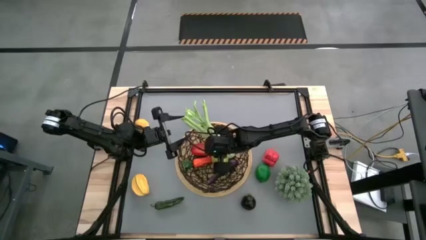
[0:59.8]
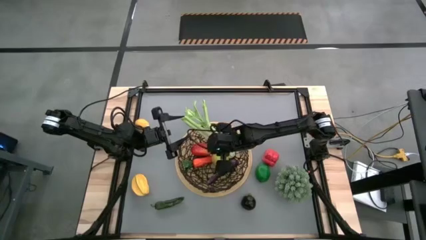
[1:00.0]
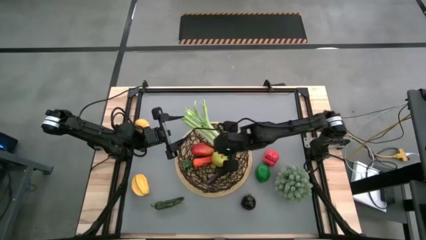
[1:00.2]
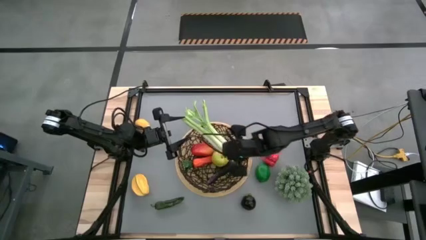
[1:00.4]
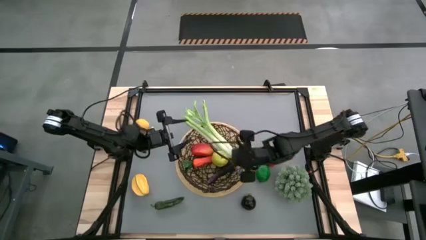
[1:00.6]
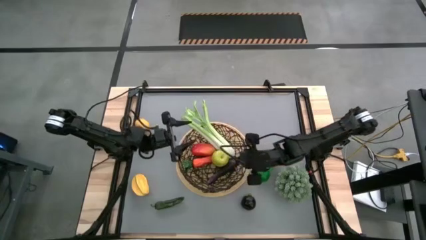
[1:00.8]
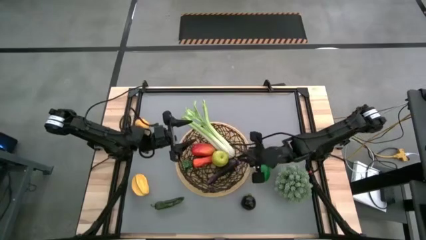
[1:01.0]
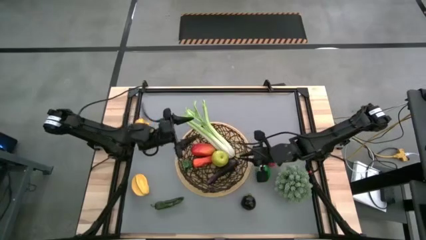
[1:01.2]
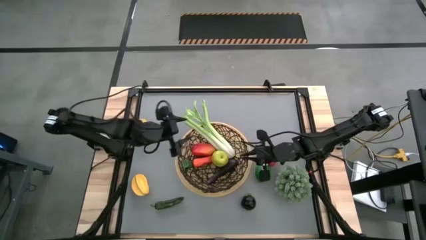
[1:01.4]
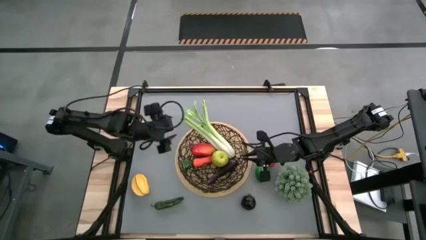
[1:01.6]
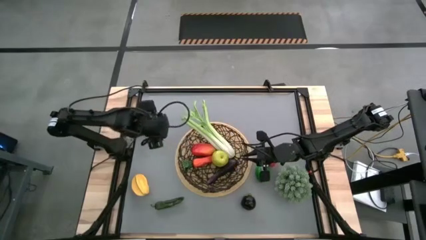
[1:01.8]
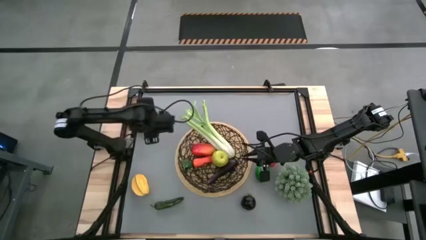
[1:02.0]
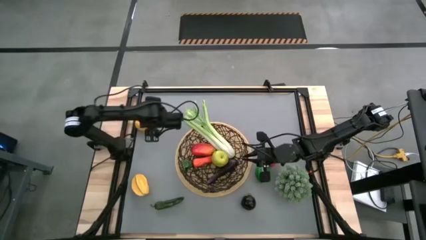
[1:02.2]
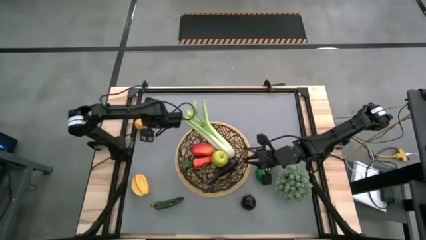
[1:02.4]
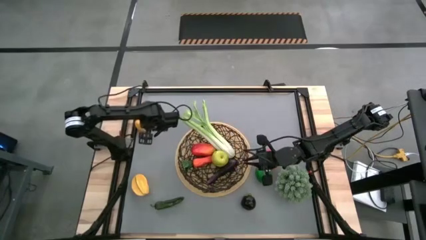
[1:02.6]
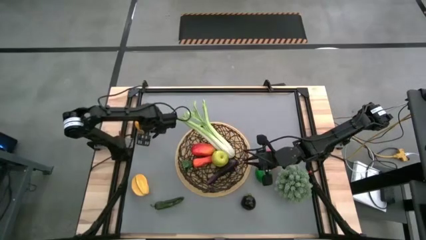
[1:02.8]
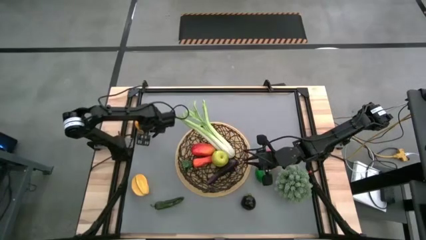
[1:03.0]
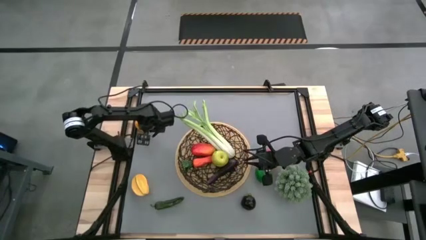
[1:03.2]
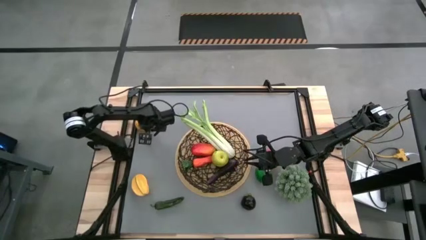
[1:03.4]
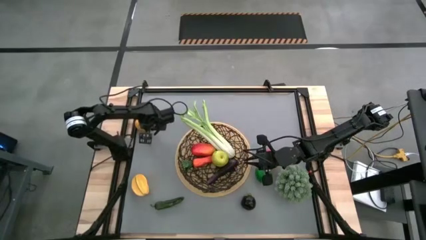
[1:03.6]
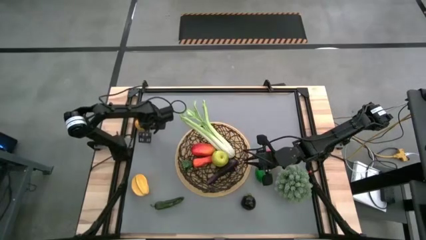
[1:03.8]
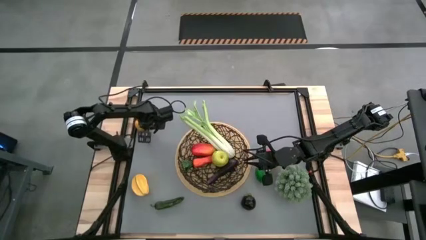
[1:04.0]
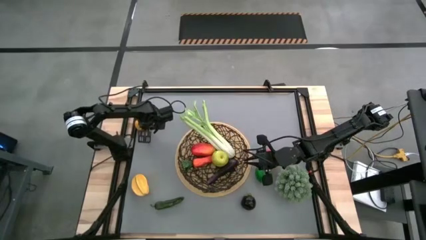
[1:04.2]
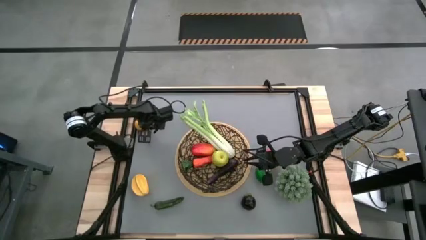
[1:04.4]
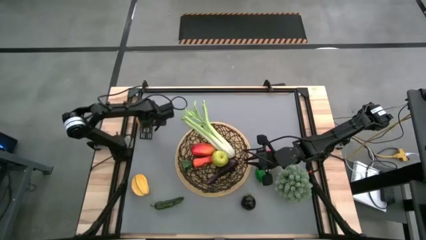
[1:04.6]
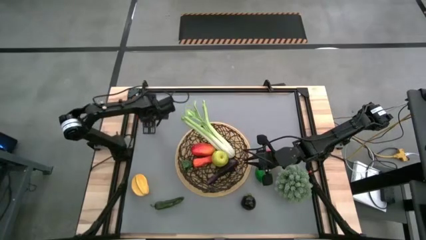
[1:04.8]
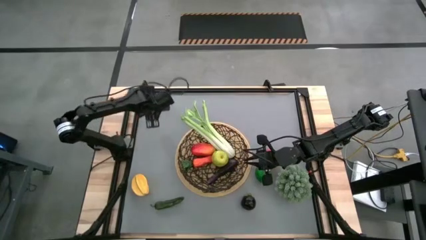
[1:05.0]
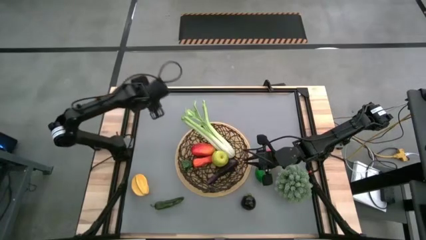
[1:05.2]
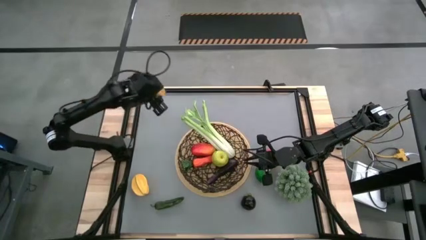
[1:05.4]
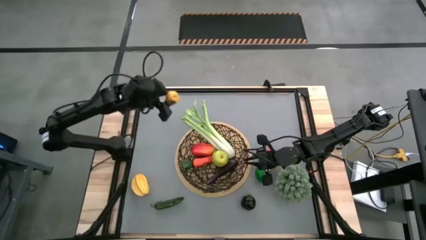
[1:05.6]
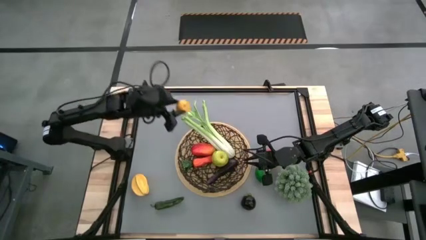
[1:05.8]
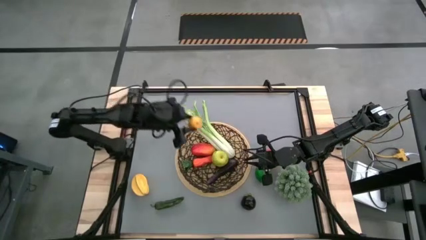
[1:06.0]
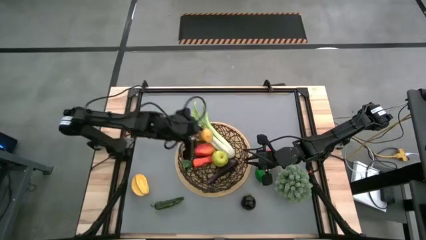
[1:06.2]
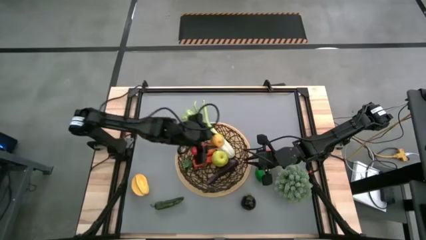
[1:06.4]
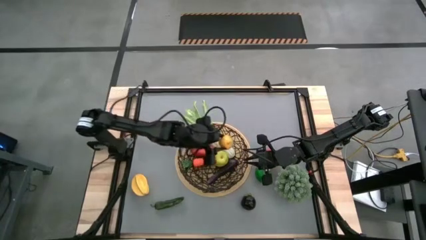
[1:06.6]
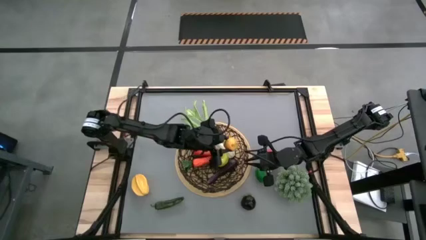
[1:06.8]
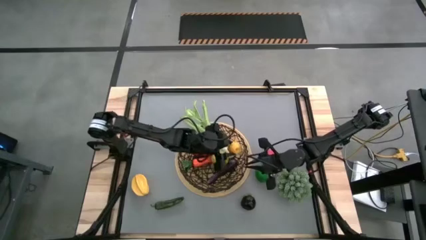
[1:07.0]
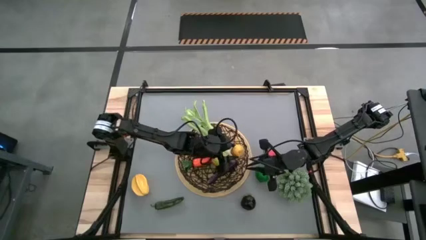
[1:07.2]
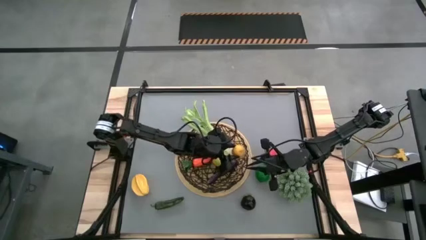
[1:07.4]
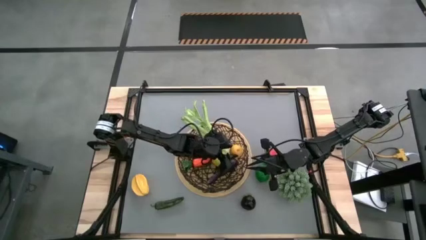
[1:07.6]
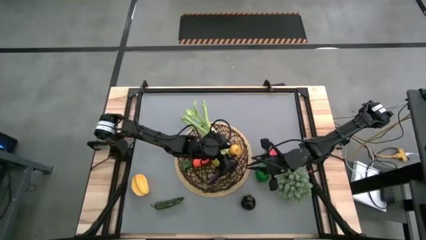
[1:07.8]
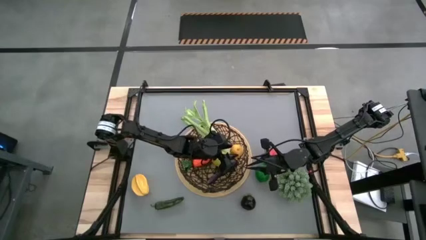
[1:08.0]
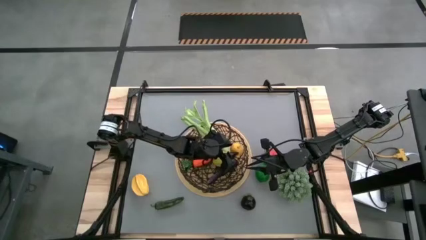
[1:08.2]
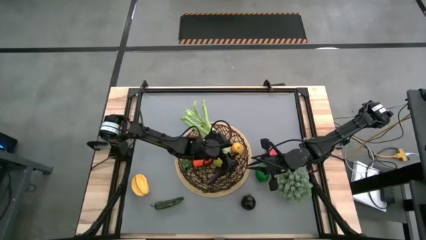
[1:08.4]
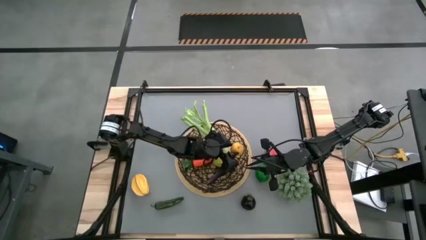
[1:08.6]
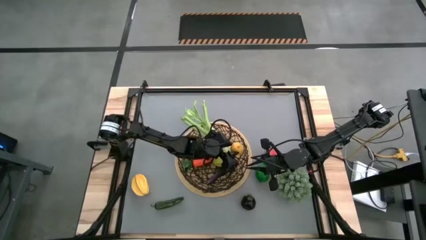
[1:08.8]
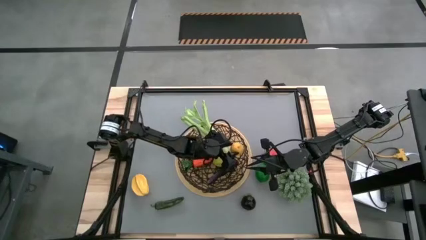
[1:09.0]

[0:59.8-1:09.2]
Task: Build produce basket
Put the lemon into the wire basket

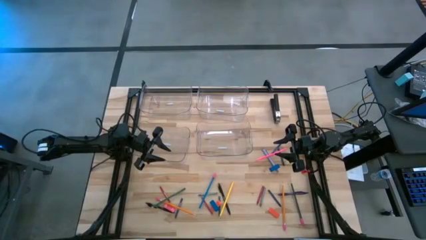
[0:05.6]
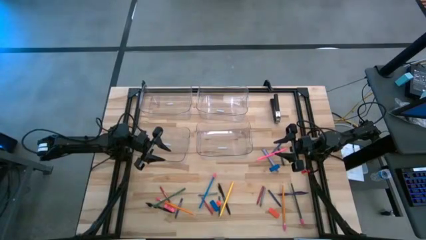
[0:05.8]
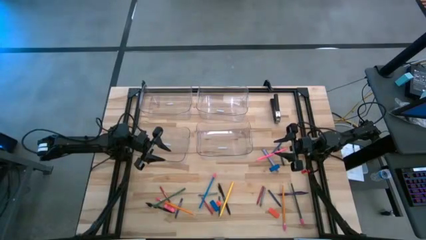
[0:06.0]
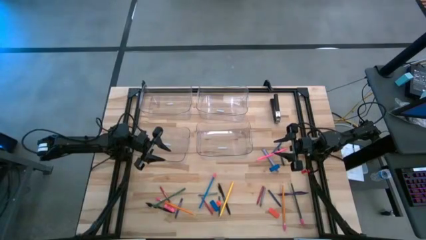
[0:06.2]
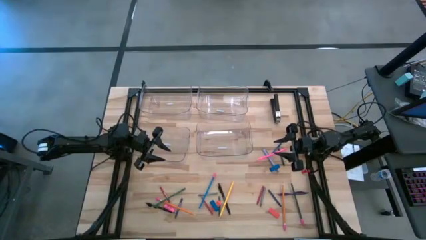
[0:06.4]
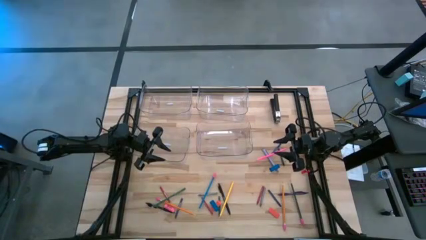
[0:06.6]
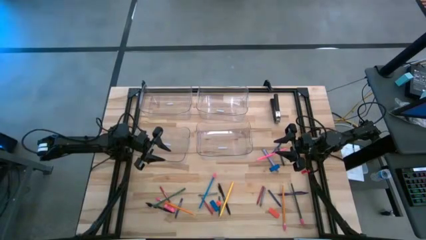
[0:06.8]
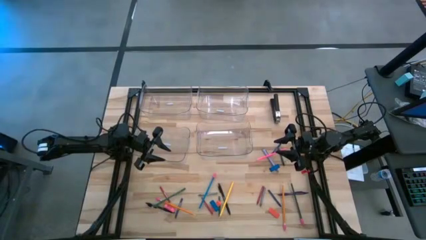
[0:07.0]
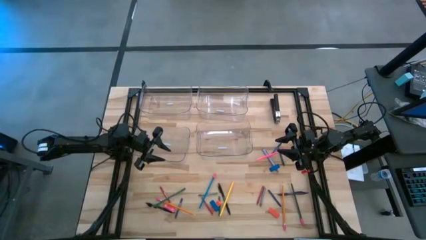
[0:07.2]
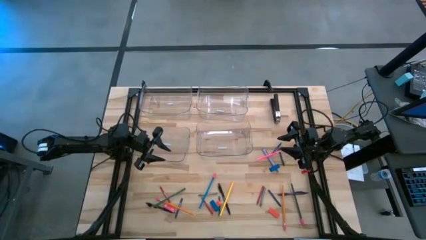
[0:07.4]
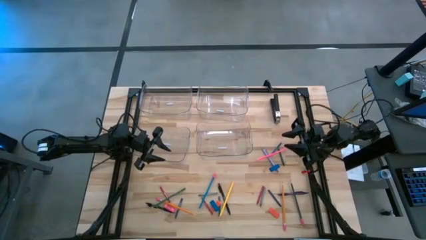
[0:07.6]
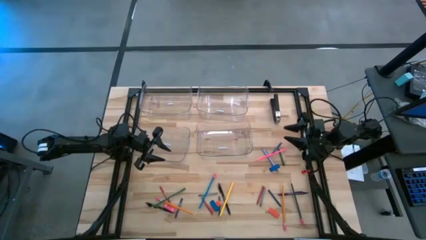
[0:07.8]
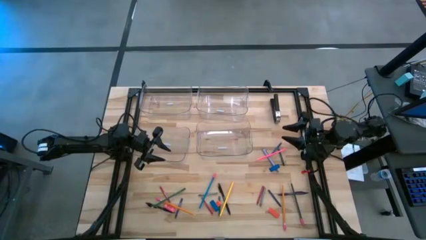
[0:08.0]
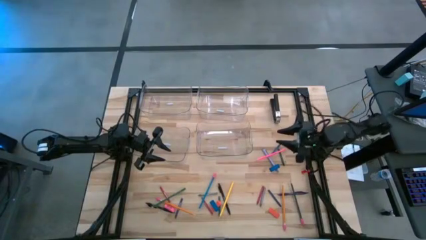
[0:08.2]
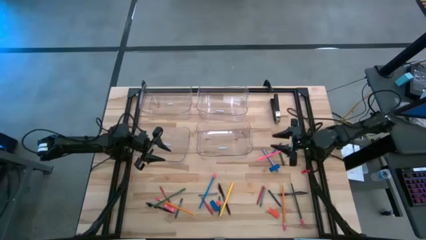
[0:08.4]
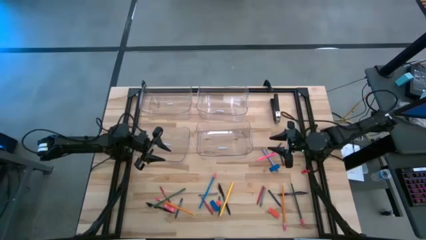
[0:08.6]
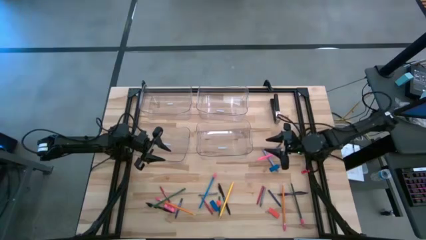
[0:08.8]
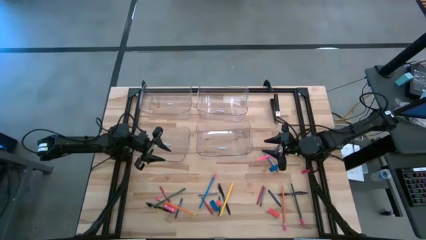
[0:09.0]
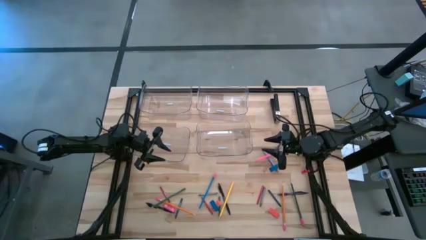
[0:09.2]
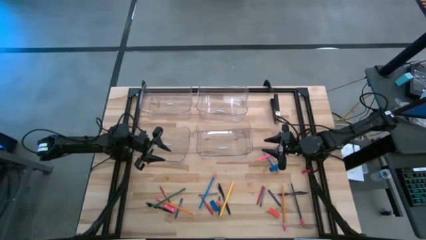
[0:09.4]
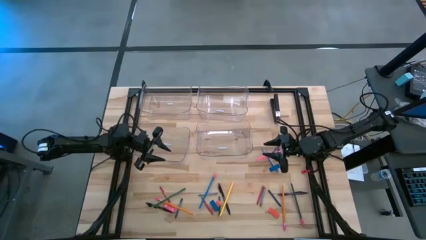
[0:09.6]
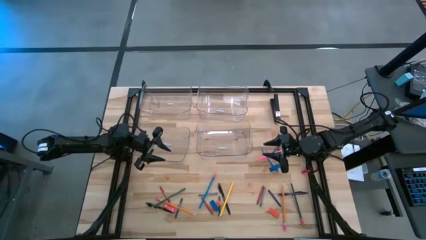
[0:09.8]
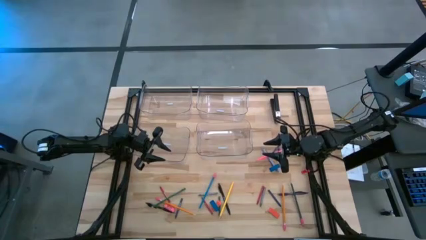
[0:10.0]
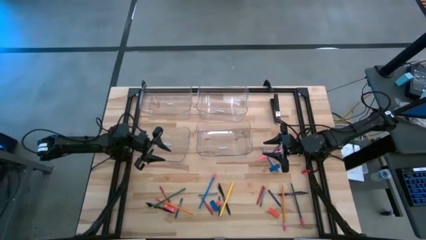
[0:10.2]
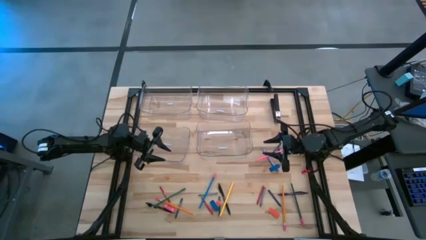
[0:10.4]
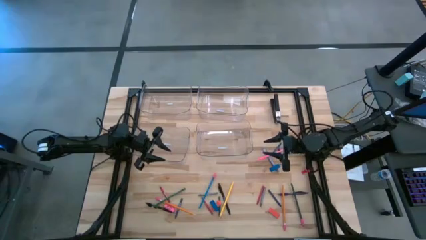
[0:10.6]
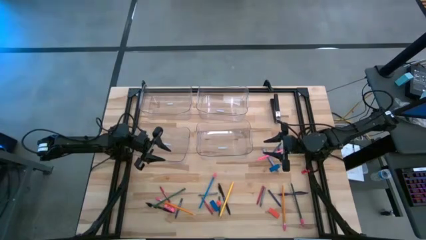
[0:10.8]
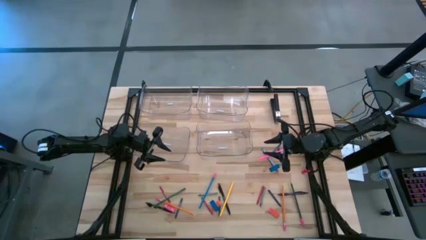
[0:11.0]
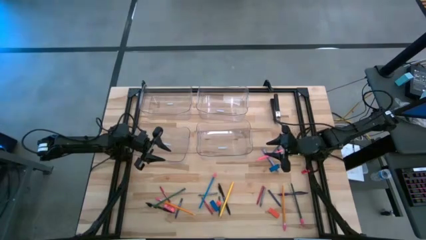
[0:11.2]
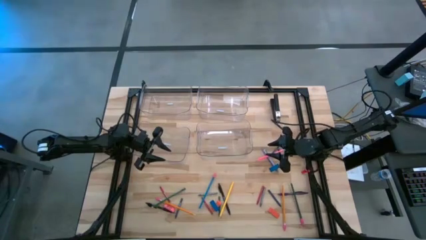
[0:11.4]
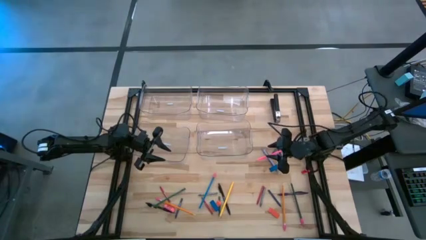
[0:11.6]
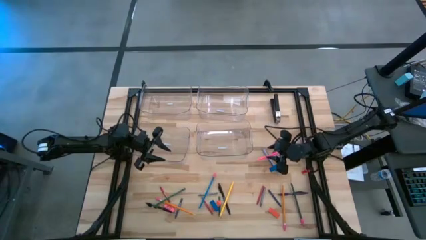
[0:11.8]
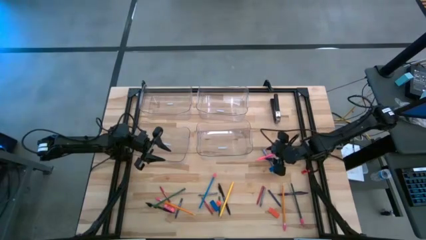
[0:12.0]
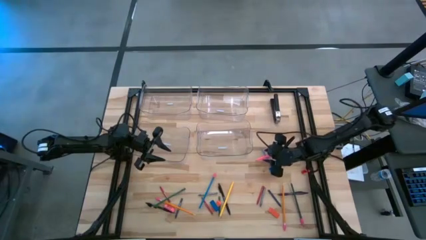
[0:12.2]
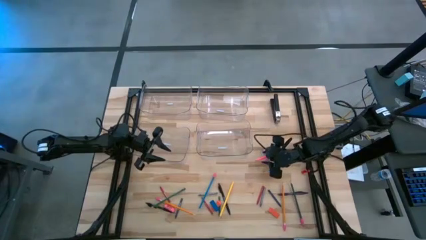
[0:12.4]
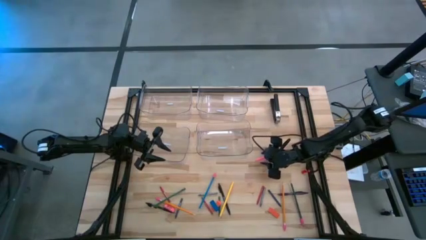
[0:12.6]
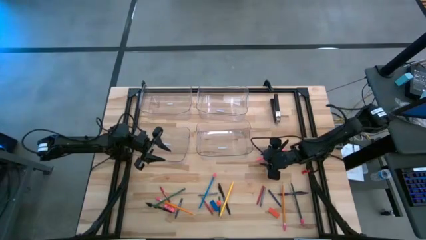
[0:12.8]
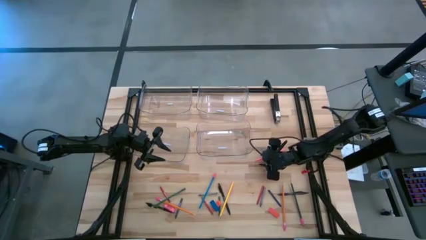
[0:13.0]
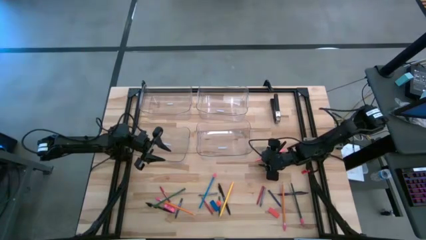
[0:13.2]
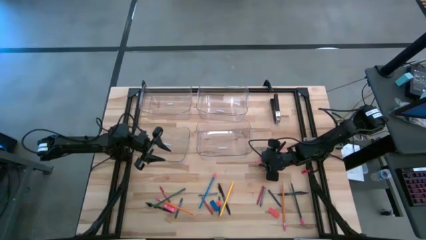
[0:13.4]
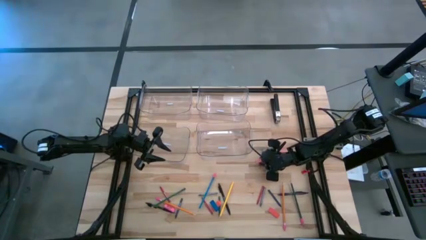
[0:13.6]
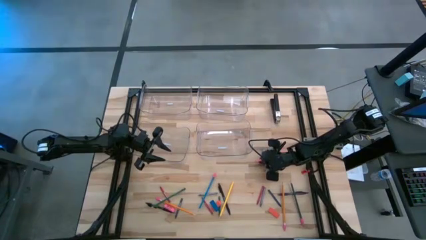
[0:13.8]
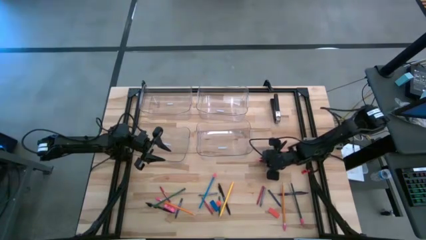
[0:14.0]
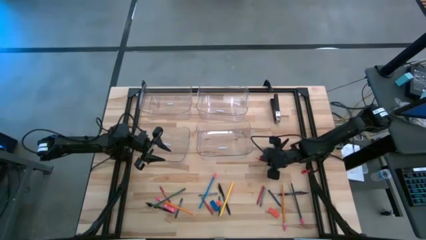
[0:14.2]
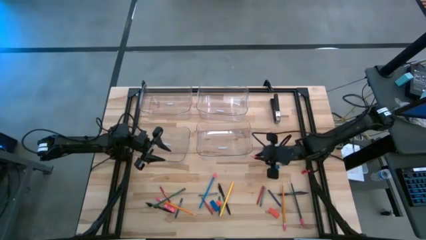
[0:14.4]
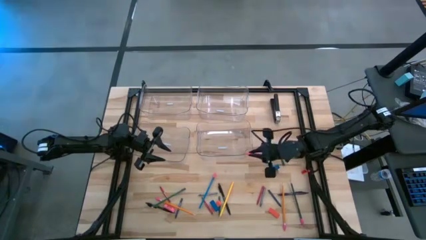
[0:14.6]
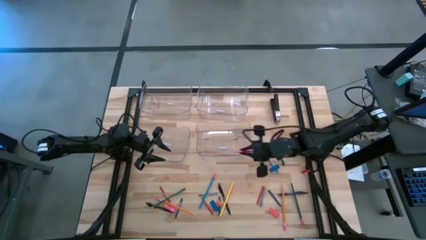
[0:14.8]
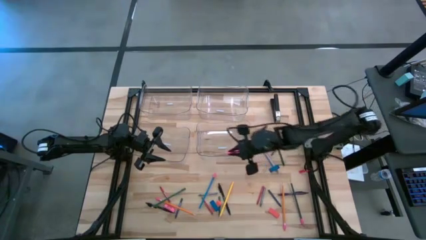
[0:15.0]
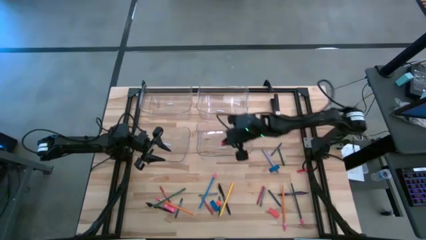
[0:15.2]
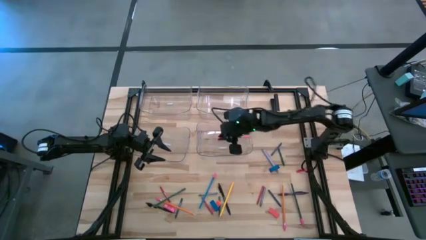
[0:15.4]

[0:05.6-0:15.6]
Task: Sort crayons/erasers/pens/pencils in bins
Put the pink pencil into the bottom right transparent bin
